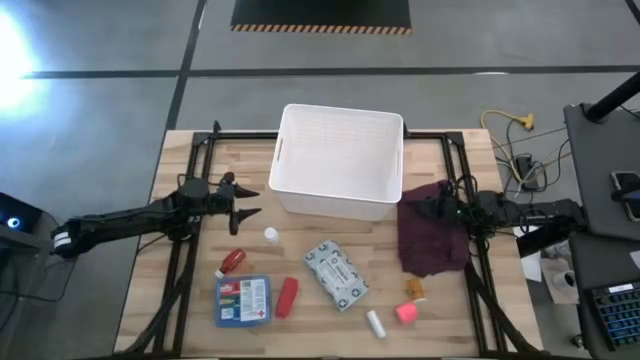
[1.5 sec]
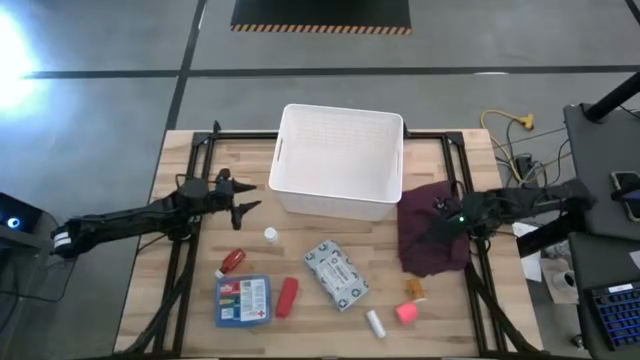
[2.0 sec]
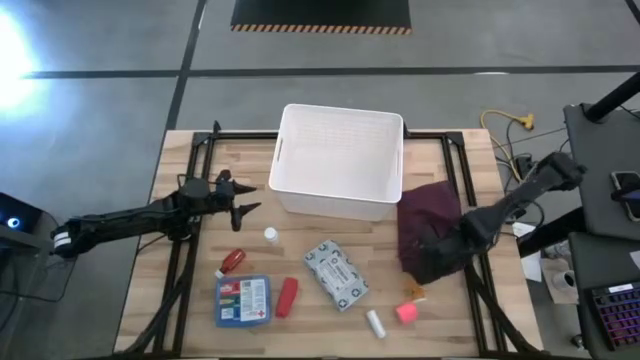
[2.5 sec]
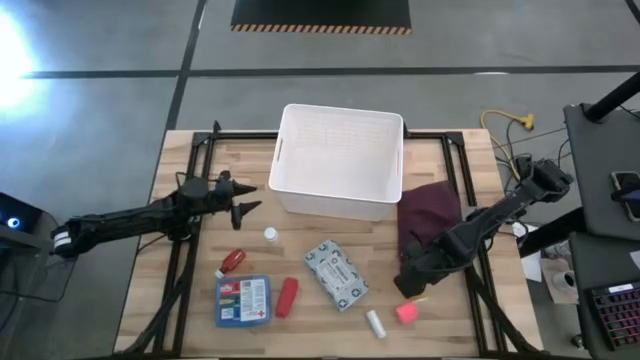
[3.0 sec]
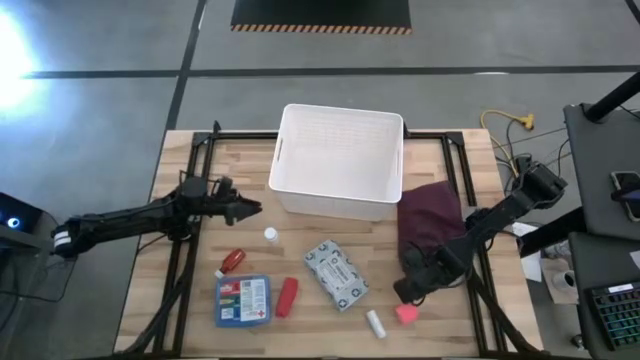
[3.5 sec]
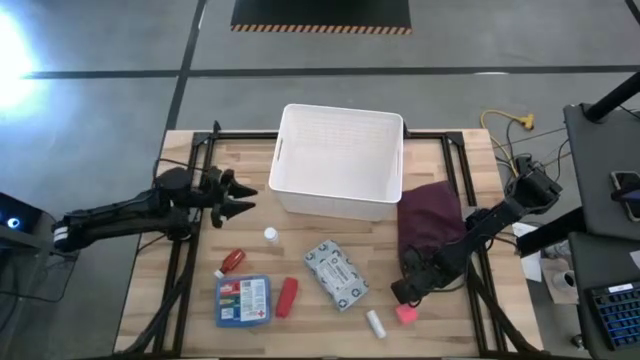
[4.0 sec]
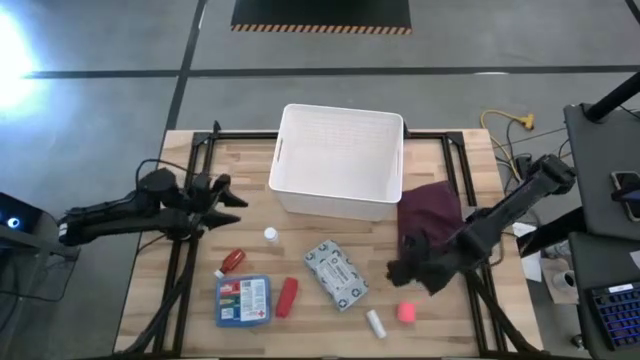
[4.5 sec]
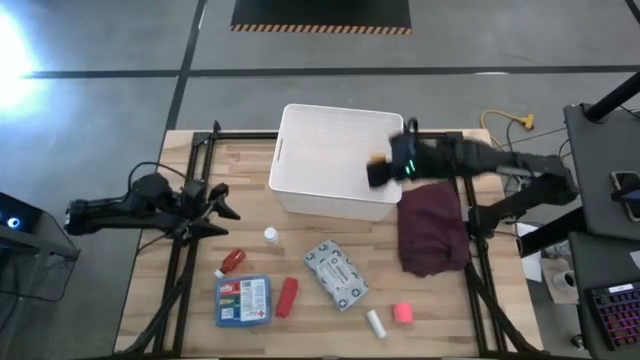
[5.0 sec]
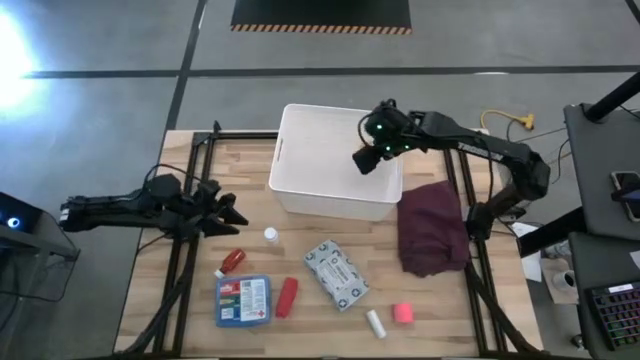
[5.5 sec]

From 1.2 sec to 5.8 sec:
Task: Pick & place medical supplies in basket/bin
Put the orange pill bottle into the white container

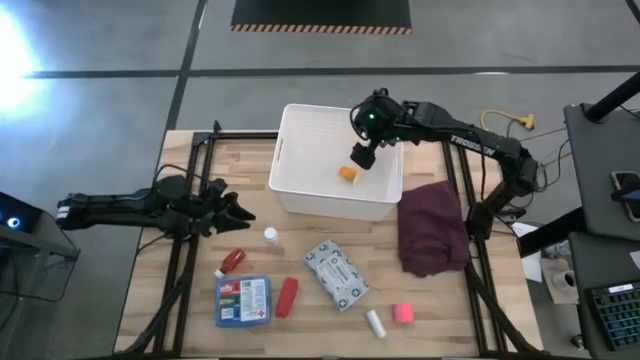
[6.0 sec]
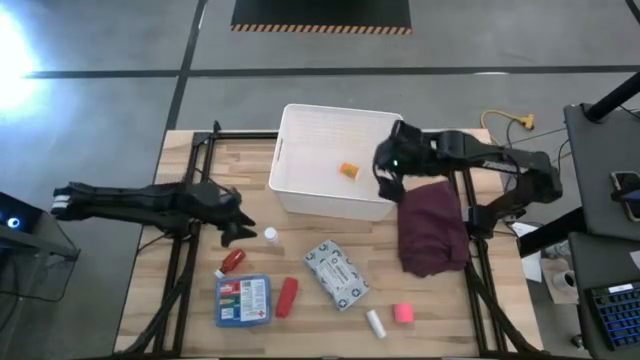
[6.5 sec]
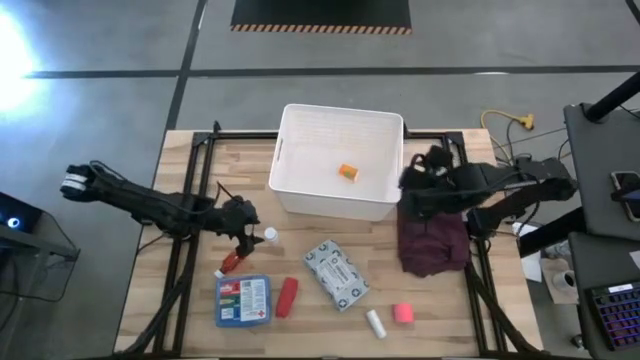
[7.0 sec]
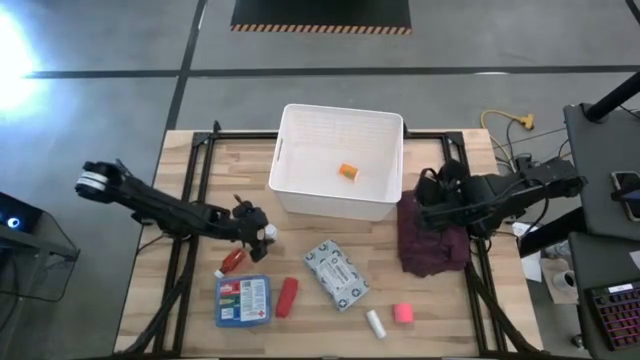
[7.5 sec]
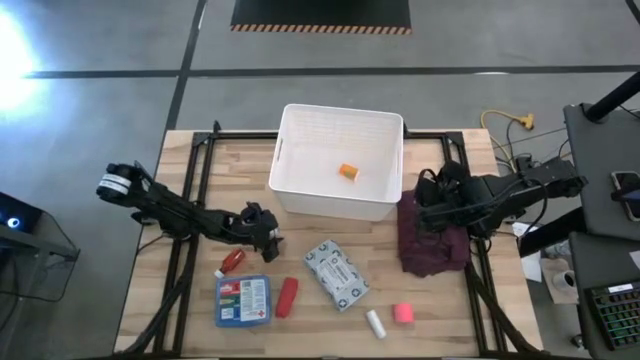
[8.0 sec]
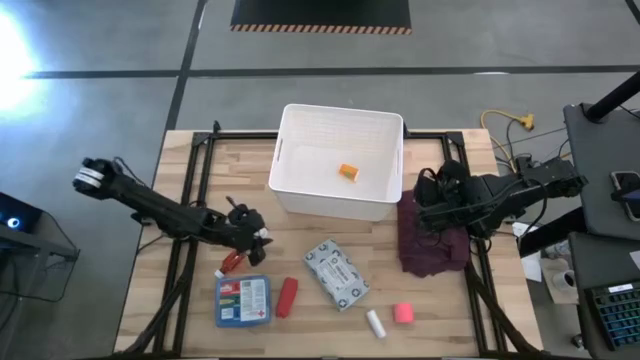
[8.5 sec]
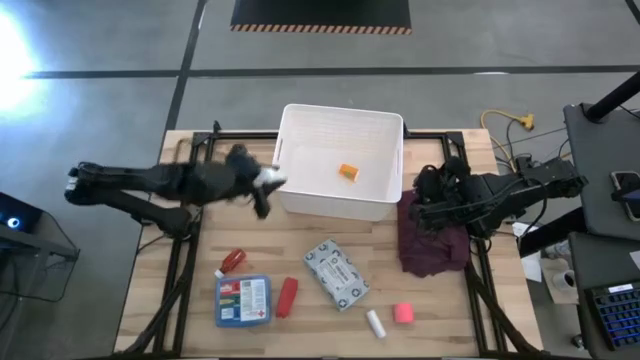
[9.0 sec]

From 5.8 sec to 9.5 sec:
Put the white pill bottle into the white container

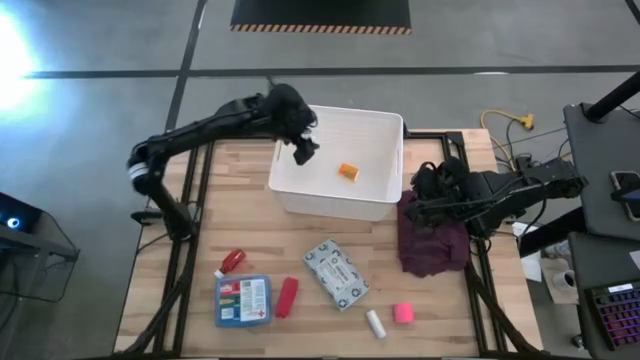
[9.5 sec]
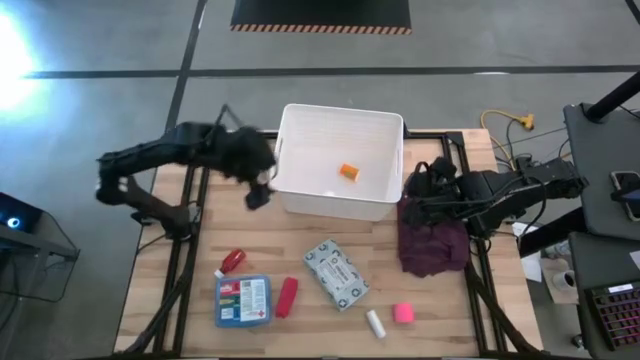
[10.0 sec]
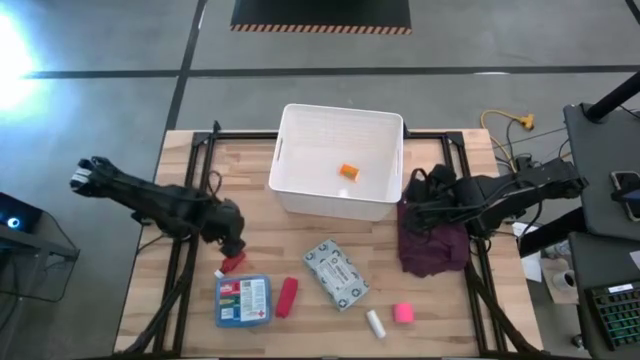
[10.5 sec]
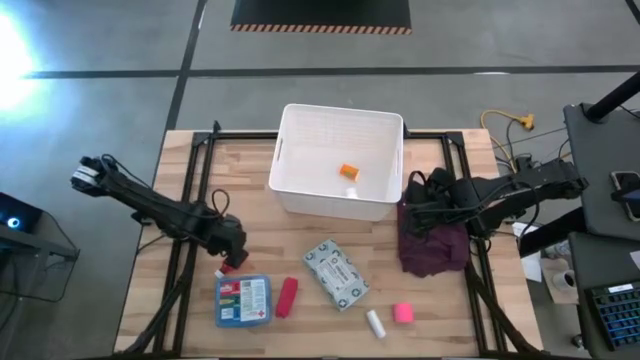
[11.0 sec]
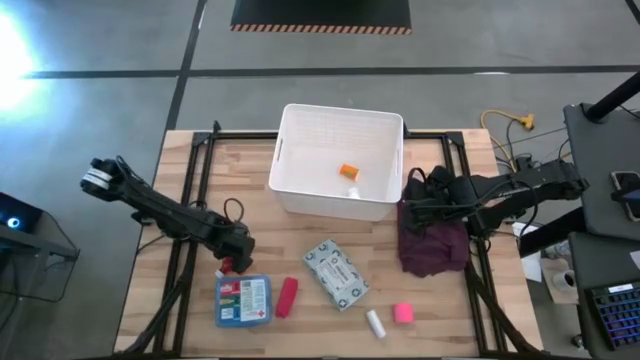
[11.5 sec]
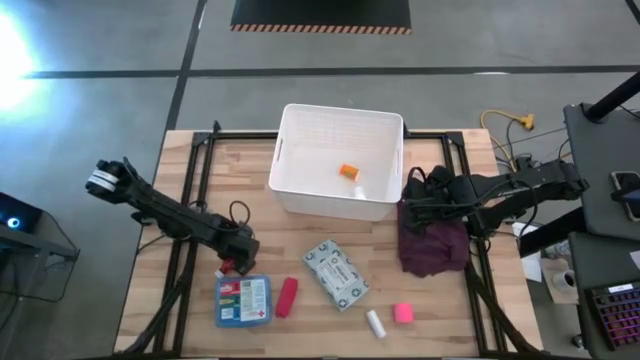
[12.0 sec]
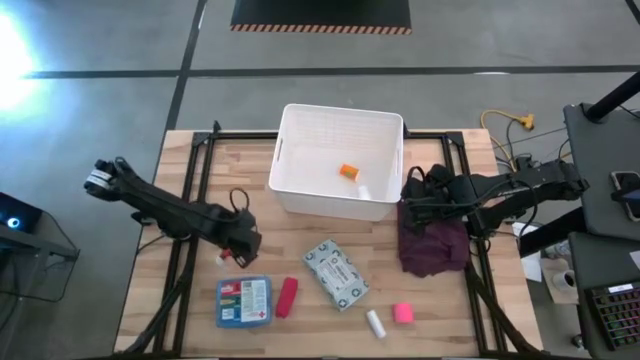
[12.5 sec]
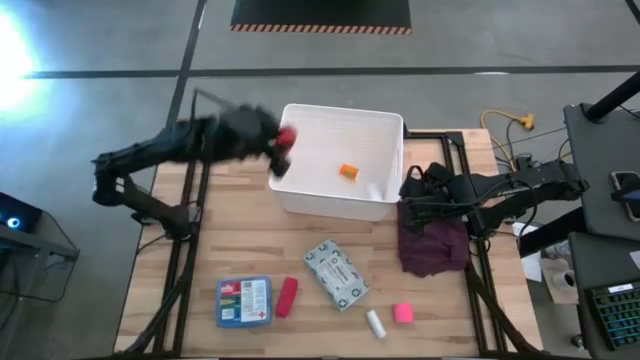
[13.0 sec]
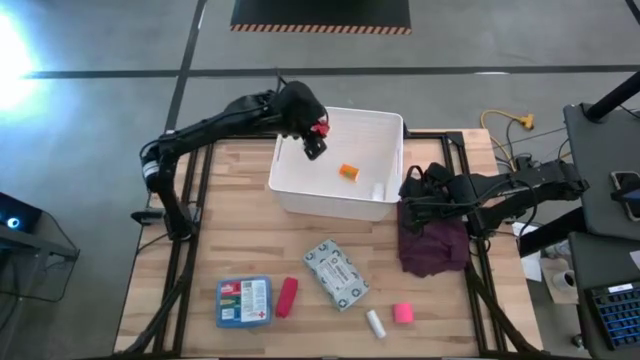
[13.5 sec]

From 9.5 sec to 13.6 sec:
Put the red pill bottle into the white container

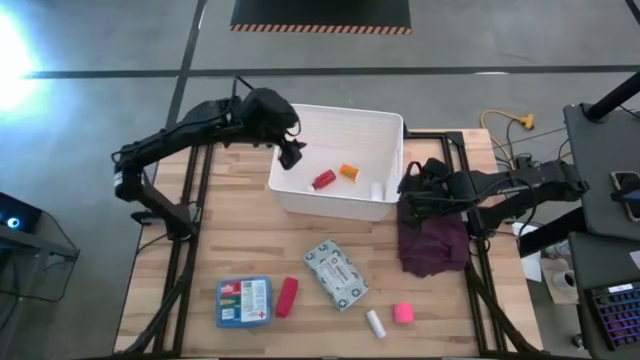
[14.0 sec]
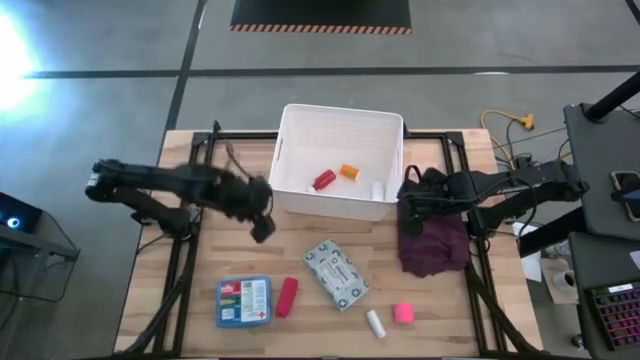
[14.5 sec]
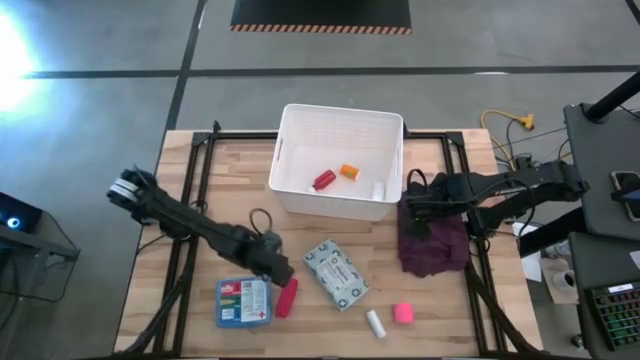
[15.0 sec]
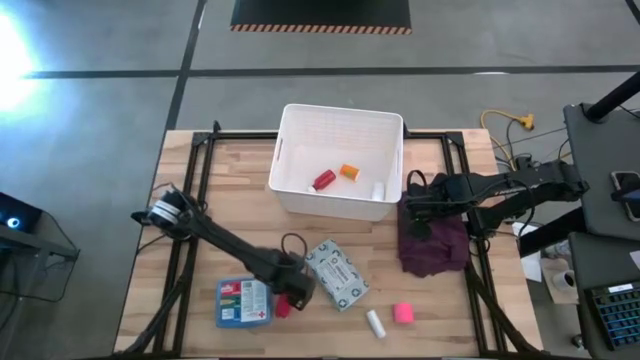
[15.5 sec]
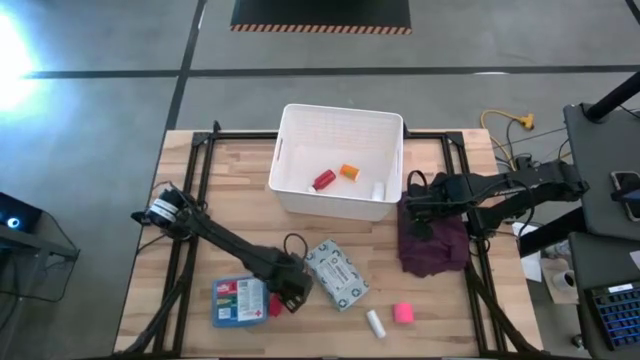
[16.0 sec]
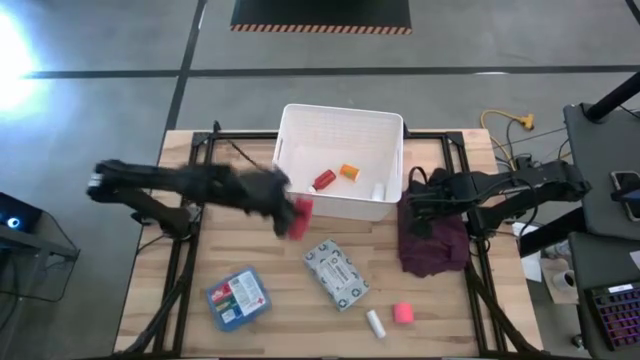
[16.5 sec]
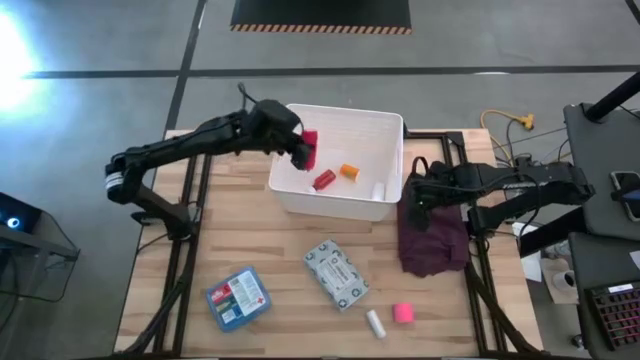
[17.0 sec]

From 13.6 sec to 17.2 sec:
Put the red bandage into the white container

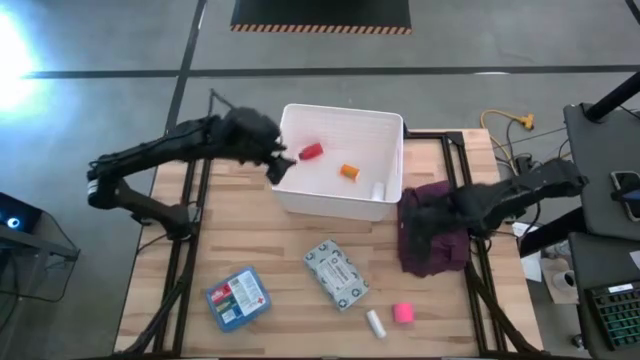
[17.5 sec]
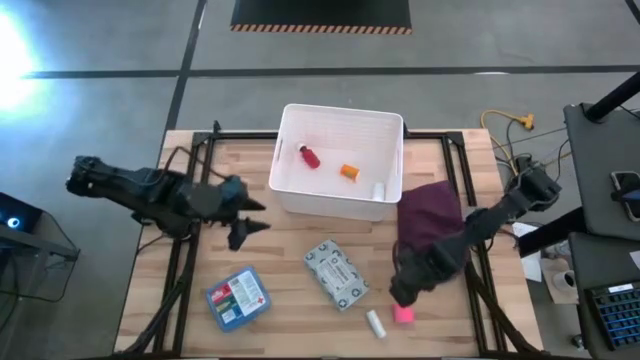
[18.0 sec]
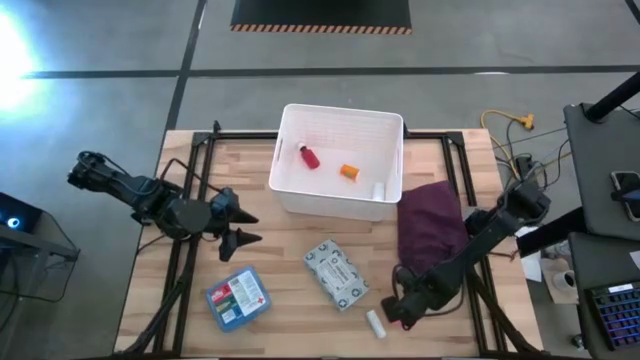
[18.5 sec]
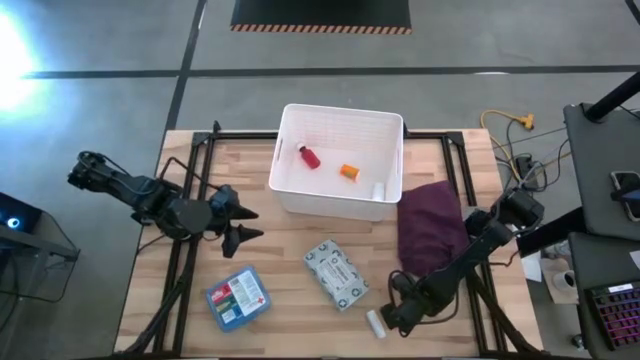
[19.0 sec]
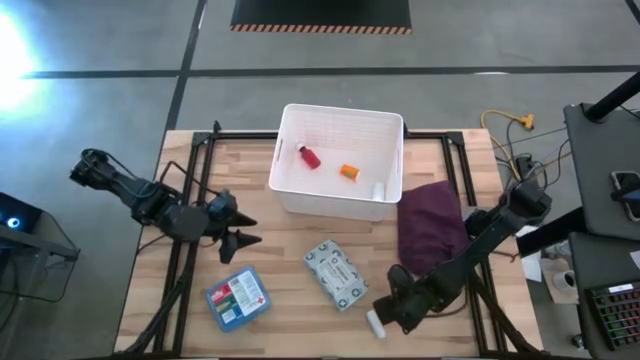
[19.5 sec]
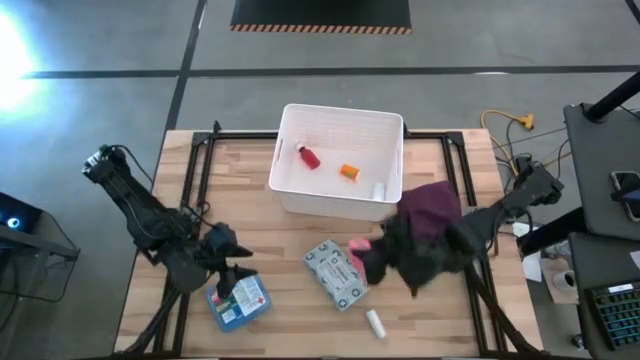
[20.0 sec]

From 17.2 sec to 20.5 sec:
Put the pink bandage into the white container

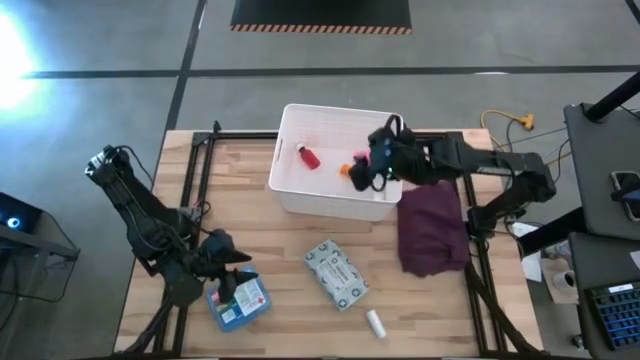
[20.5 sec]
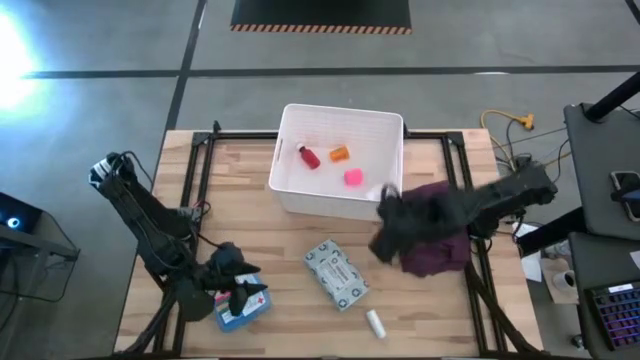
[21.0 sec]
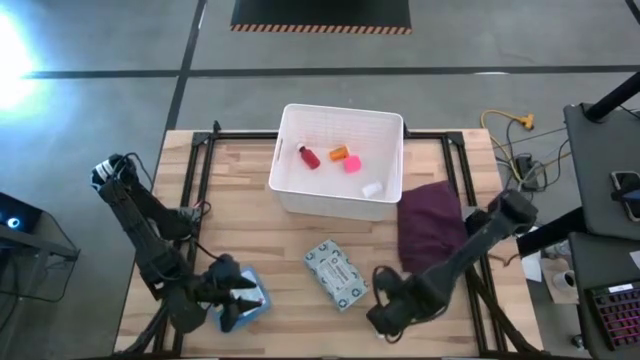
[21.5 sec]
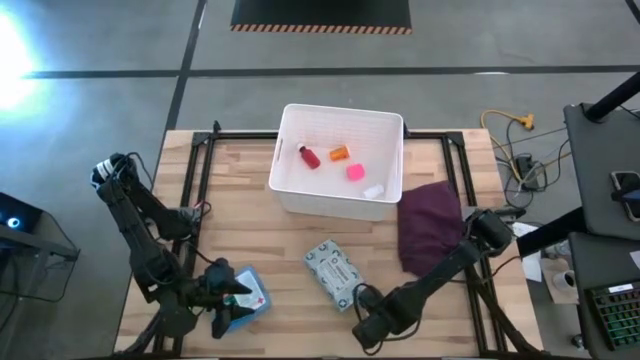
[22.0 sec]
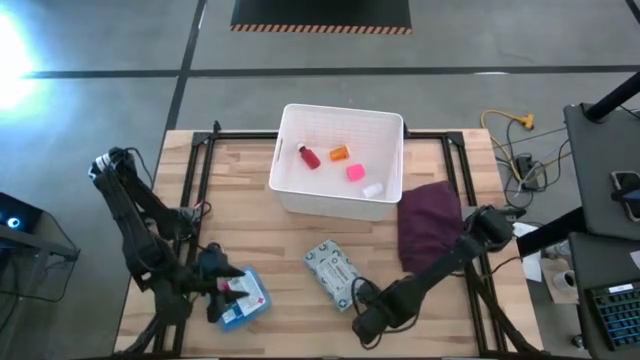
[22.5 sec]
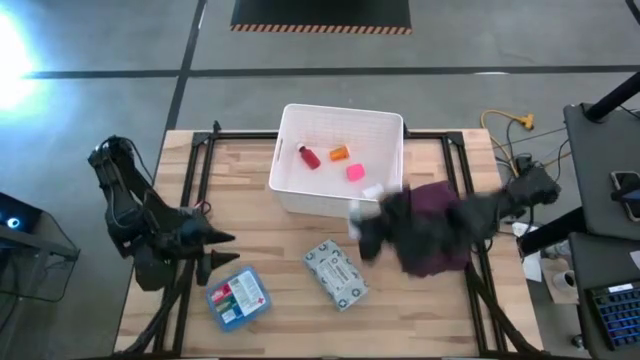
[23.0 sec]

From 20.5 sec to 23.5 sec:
Put the white rolled gauze into the white container
